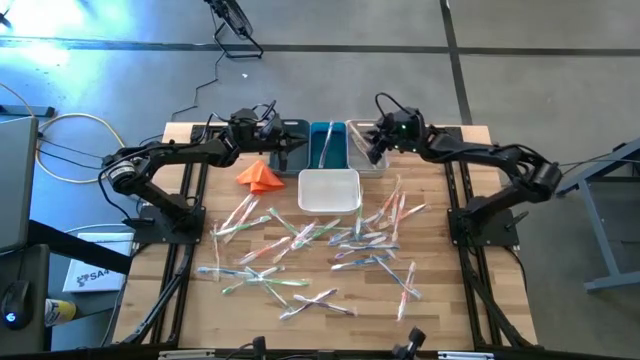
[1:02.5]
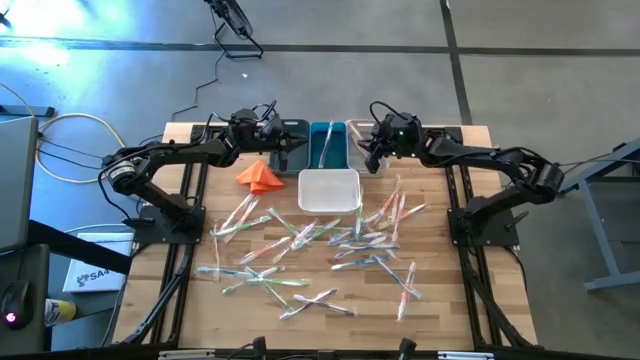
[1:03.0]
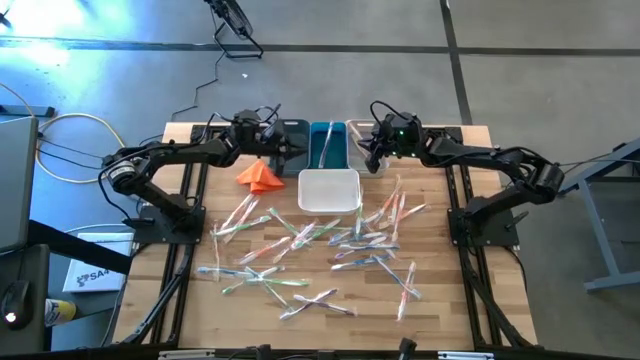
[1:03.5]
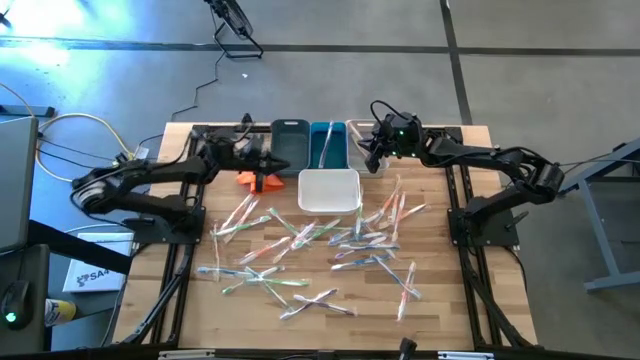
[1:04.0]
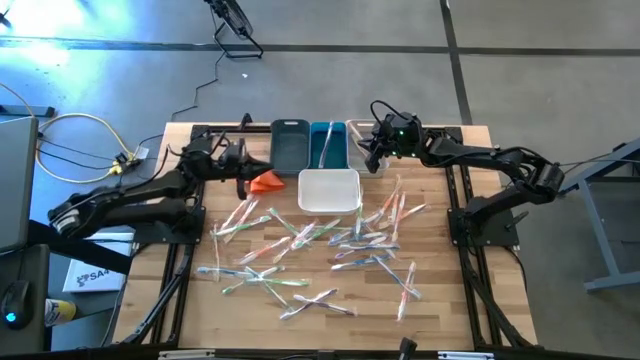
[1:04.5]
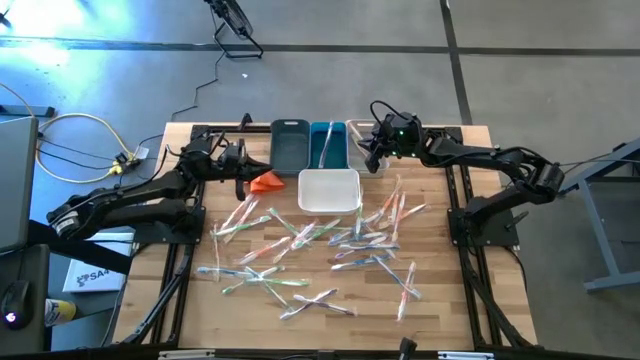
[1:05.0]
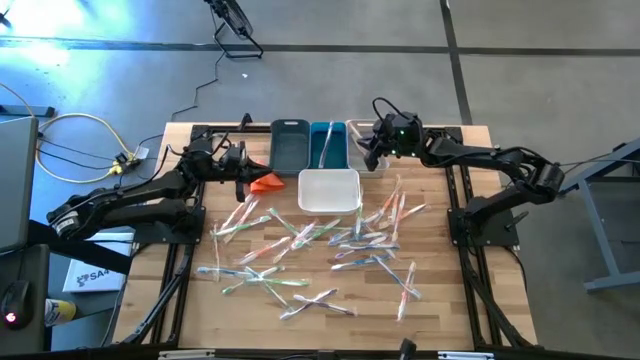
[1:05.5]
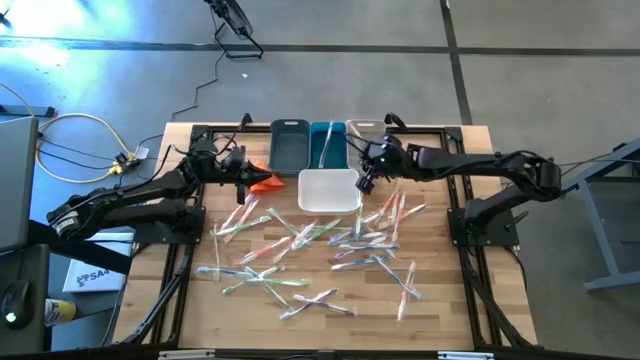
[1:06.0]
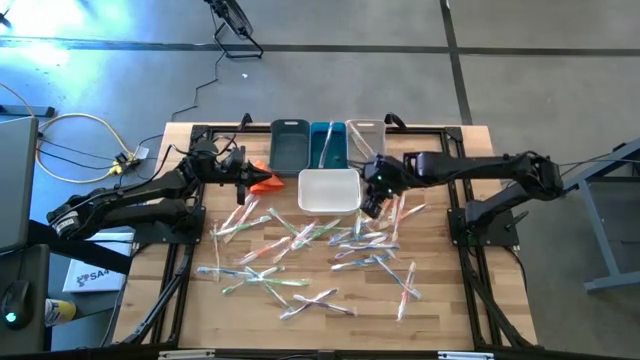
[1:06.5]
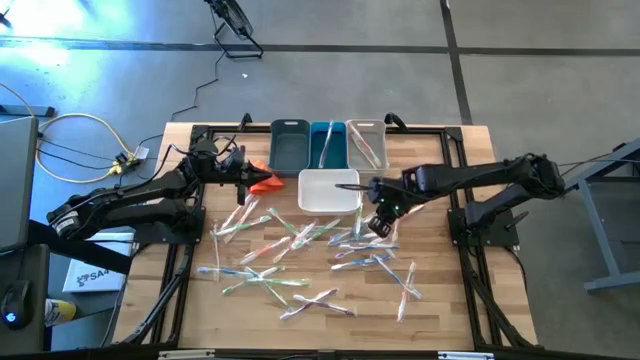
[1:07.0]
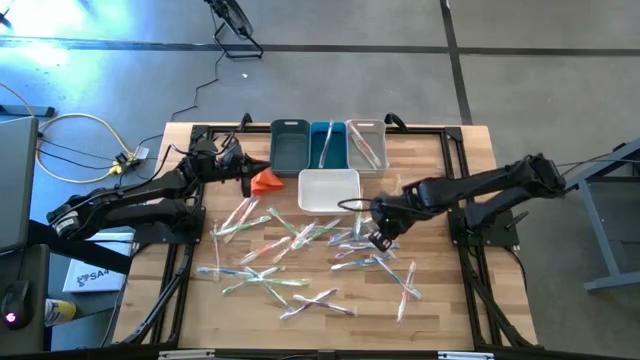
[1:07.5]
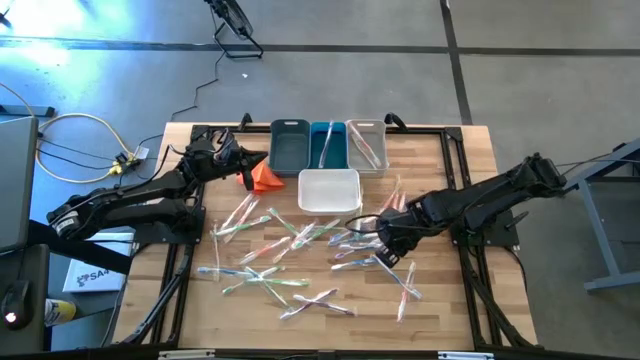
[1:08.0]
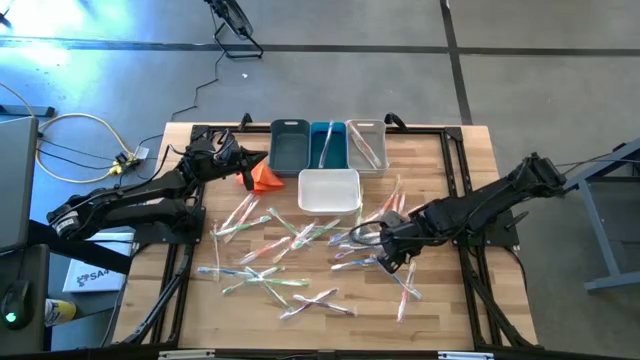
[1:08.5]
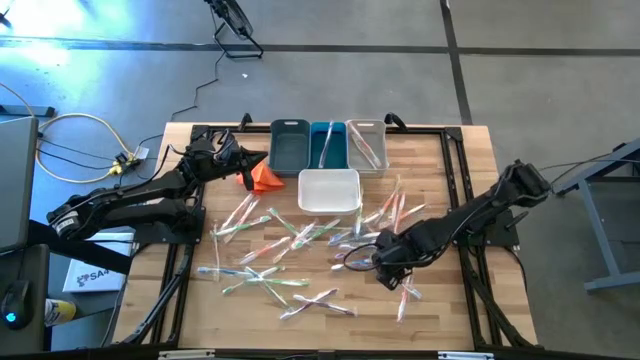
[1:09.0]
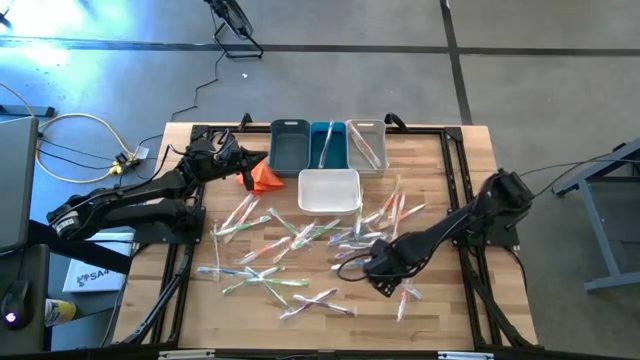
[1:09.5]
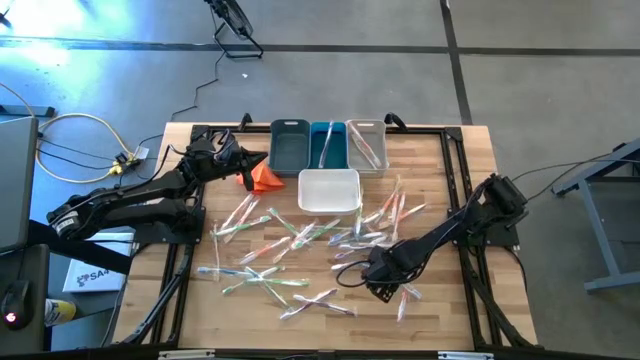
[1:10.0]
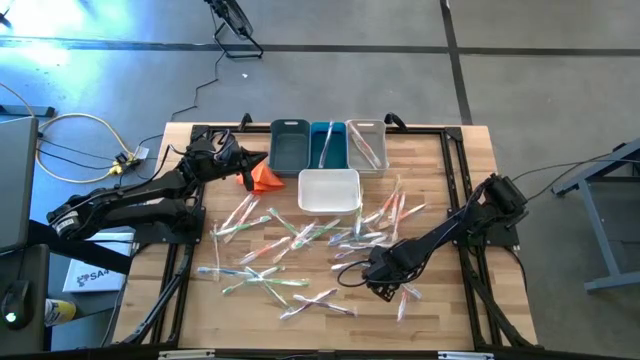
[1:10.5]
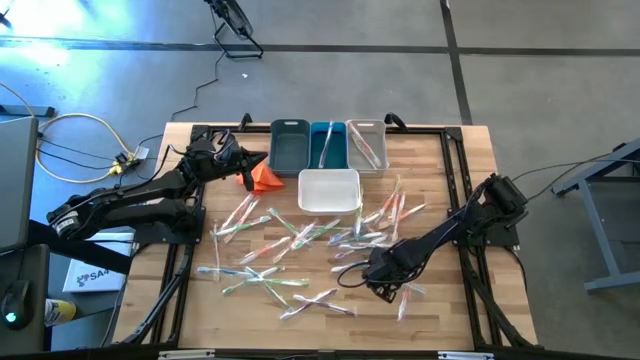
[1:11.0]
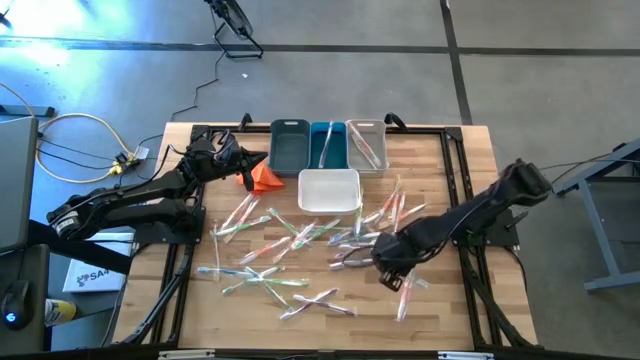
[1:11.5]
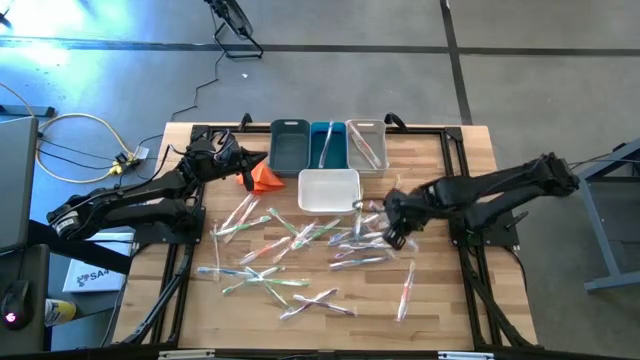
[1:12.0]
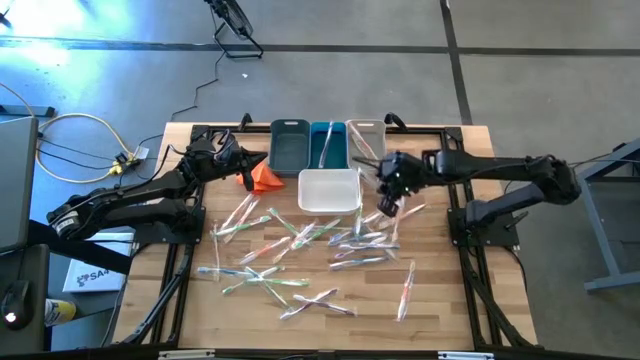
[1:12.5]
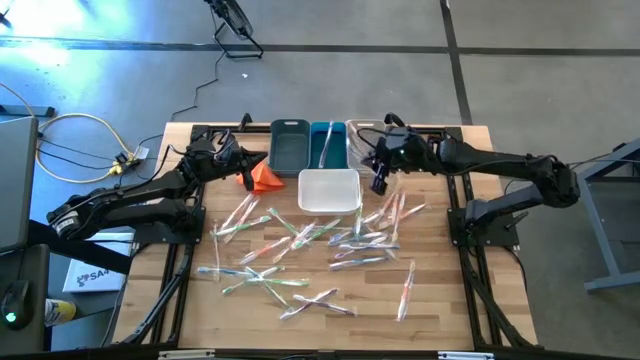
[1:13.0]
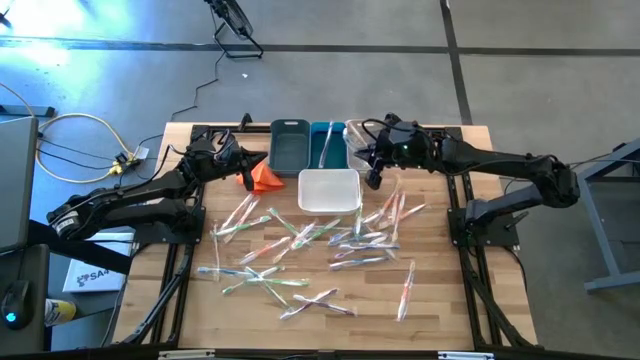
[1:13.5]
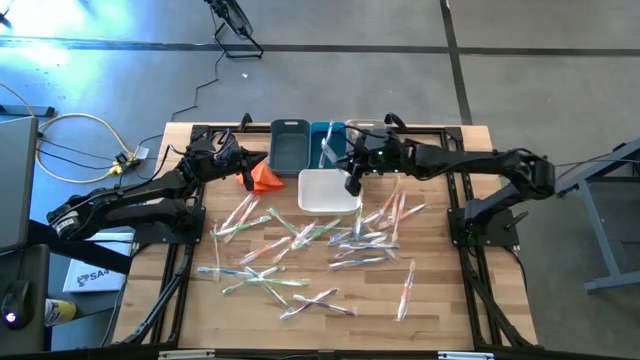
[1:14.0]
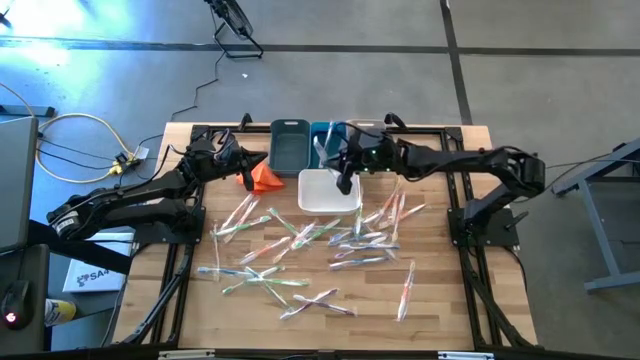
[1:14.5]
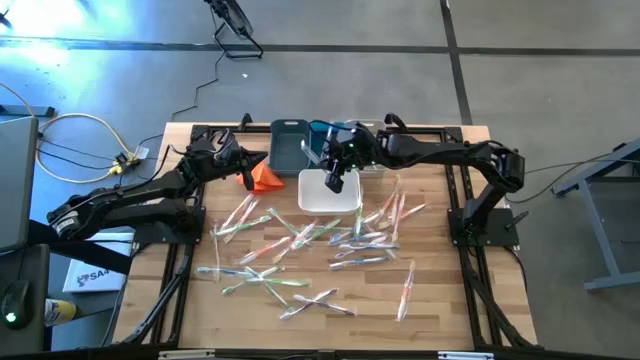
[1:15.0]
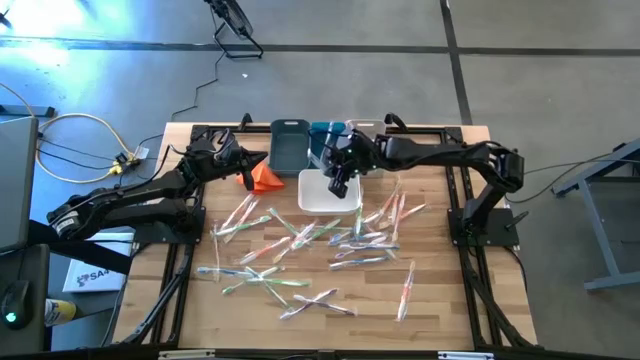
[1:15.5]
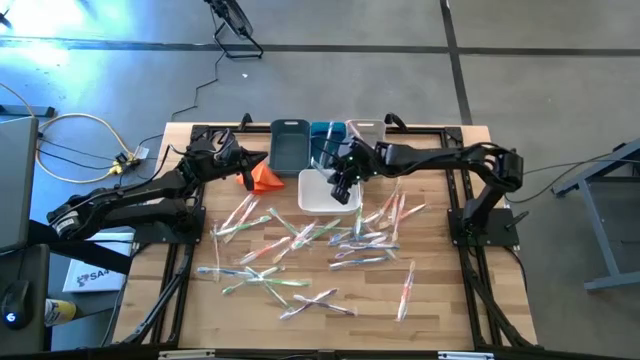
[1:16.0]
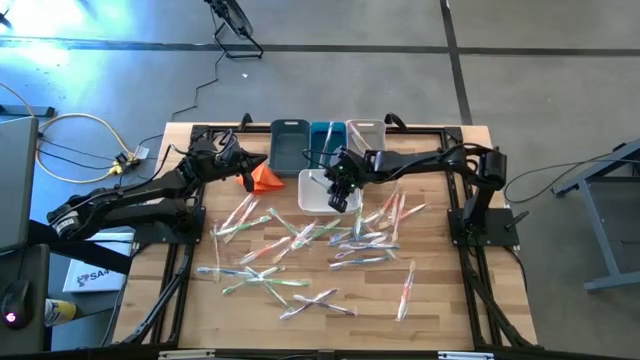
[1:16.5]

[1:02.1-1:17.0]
Task: Pick & Place Toothbrushes
Put the blue toothbrush into the white bin

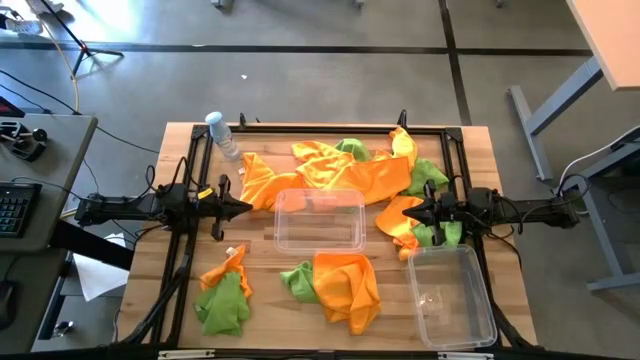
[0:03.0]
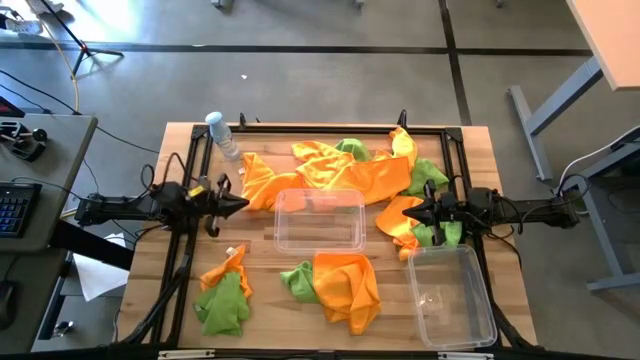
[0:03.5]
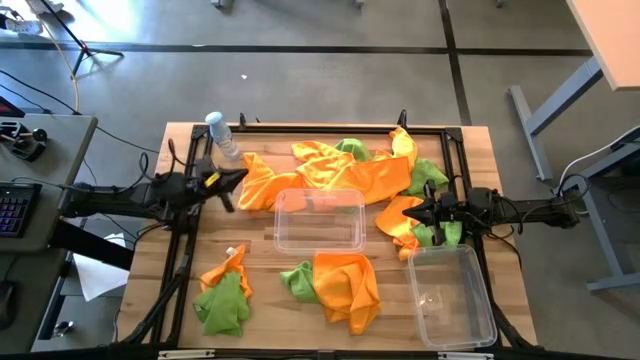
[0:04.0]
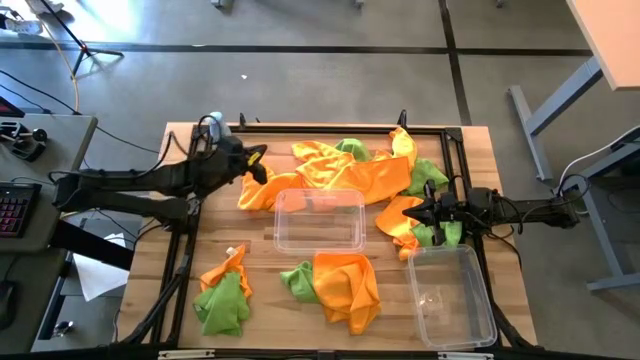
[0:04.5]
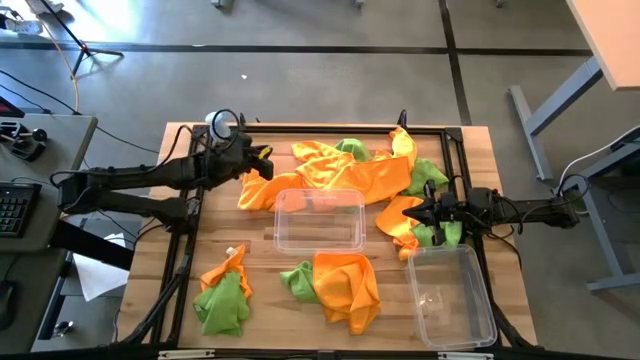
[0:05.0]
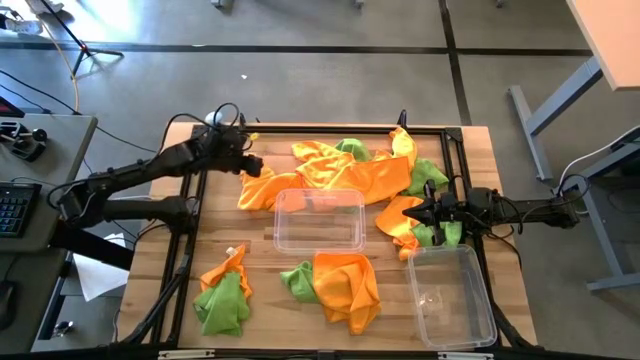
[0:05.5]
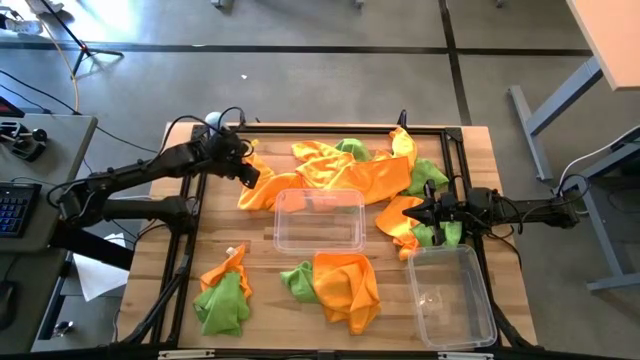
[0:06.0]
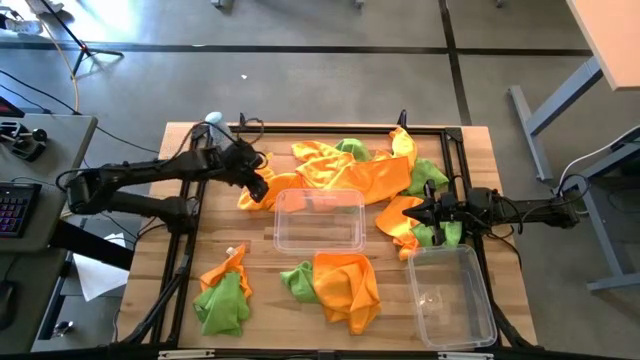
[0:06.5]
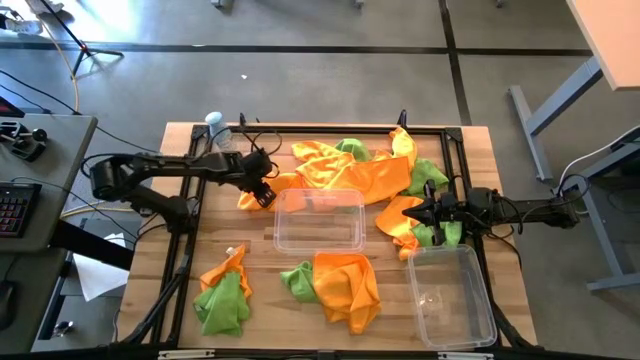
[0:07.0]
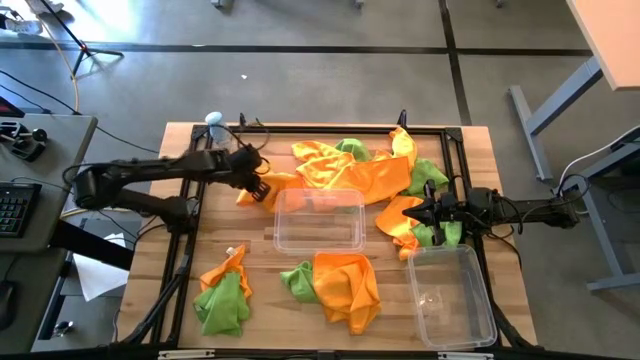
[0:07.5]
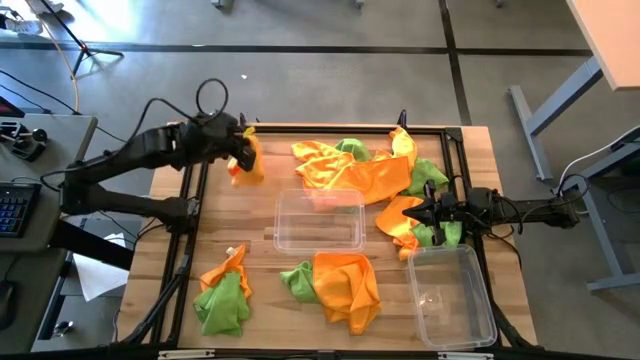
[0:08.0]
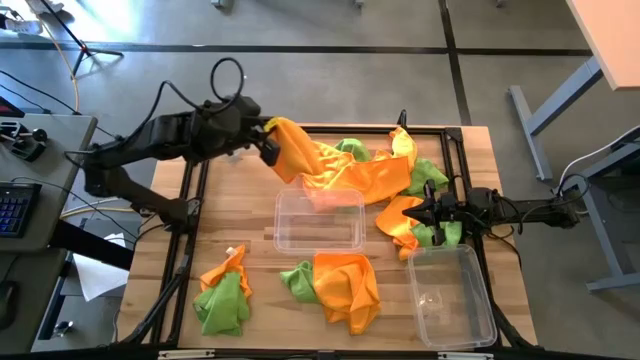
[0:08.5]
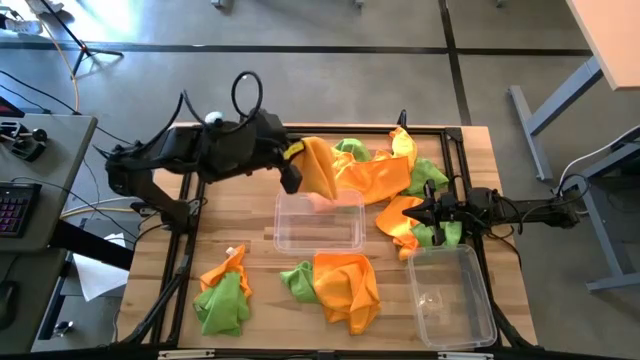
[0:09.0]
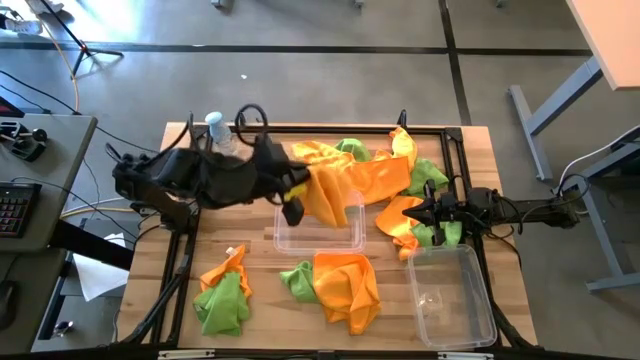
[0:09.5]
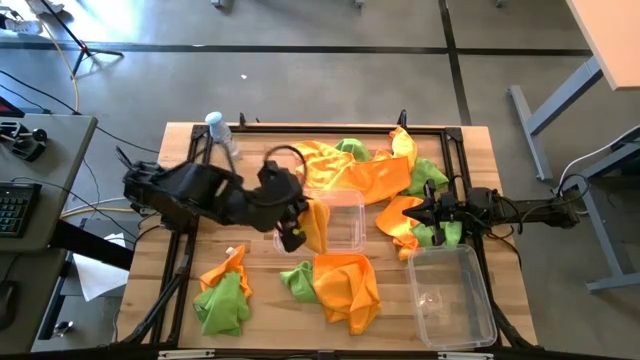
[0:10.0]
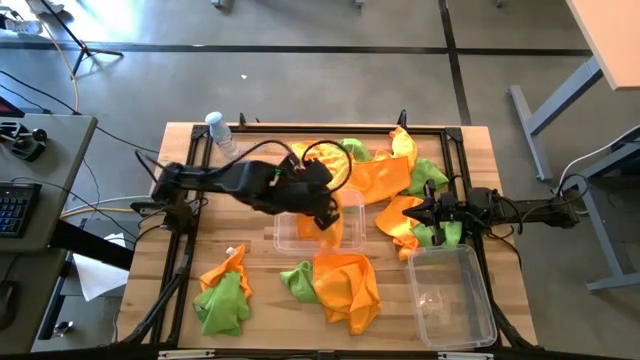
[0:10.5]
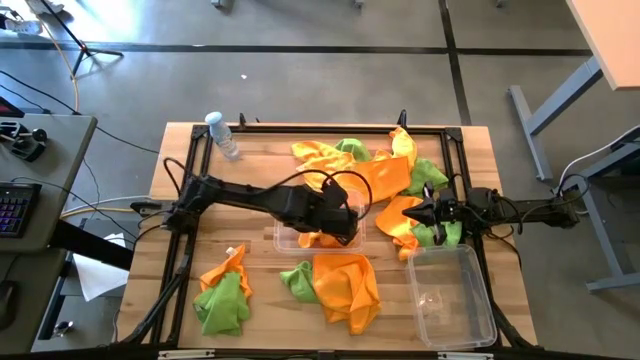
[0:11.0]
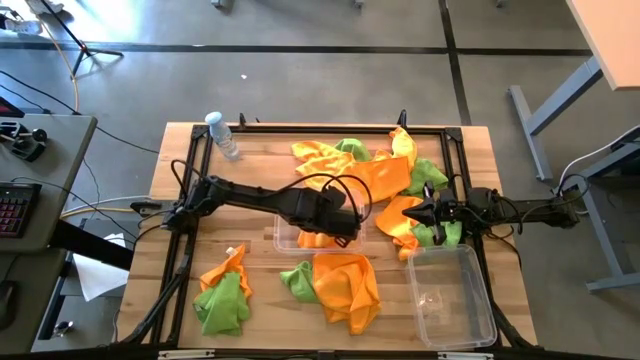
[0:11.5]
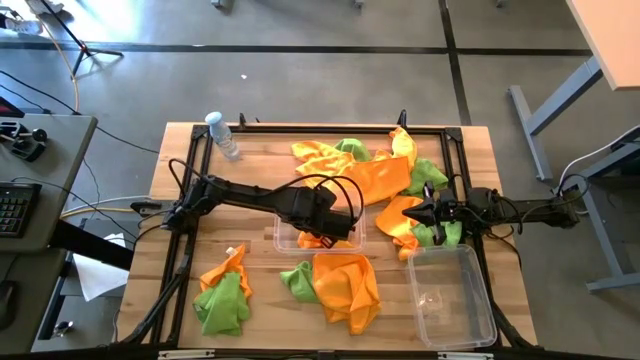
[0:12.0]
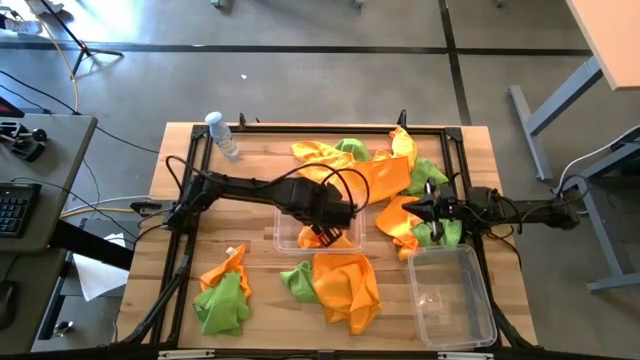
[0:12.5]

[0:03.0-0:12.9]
Task: Sort microfiber towel by color & place in baskets
Put the orange towel into the top transparent bin
